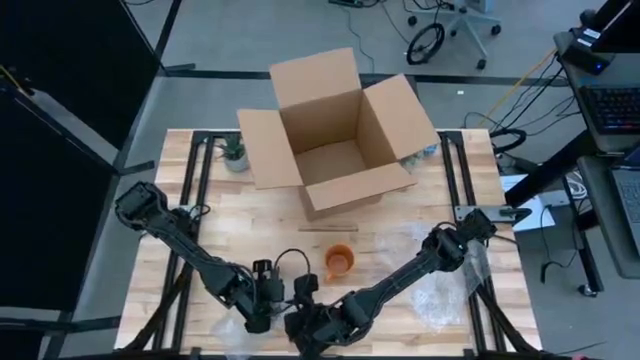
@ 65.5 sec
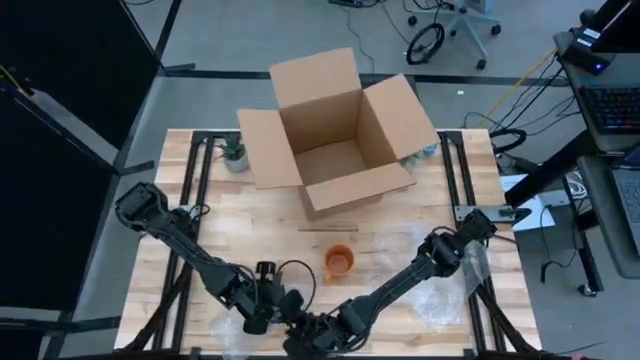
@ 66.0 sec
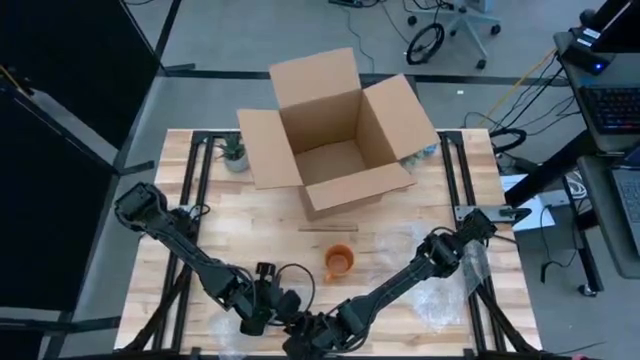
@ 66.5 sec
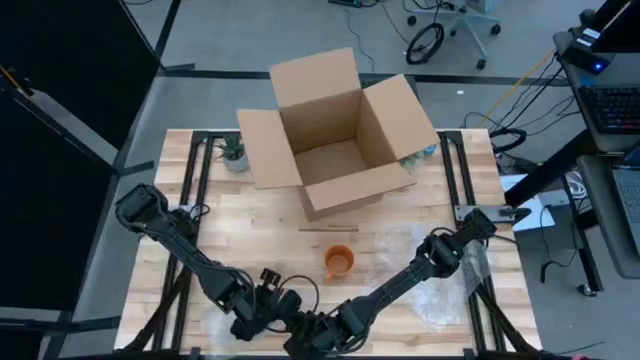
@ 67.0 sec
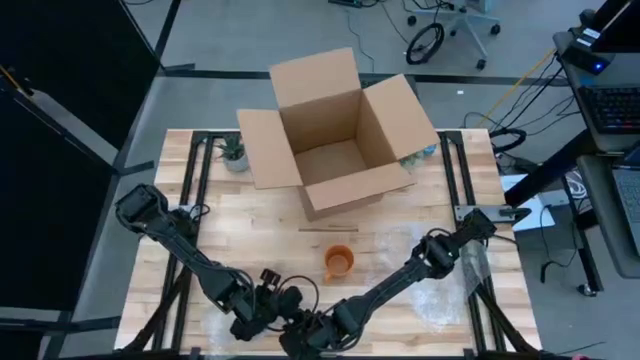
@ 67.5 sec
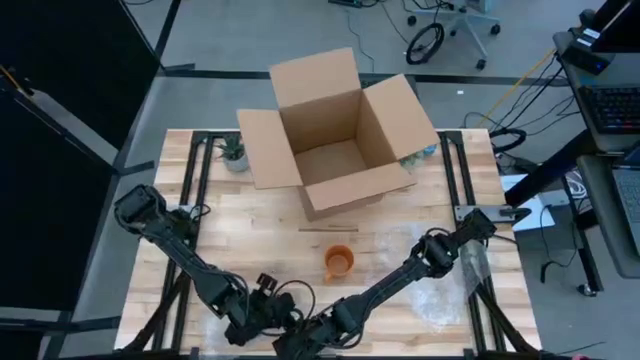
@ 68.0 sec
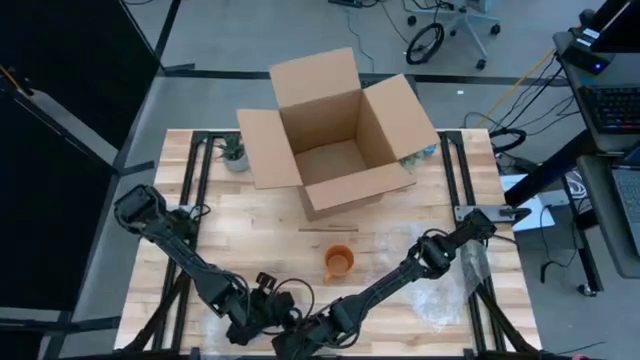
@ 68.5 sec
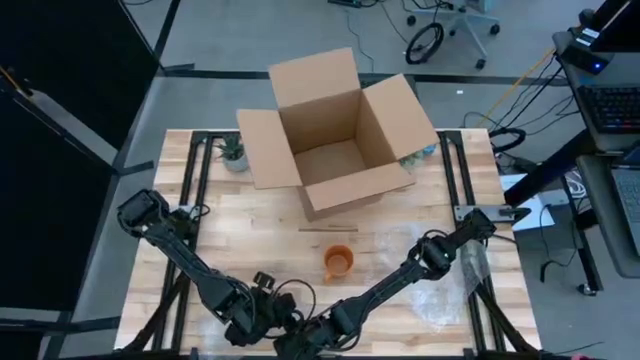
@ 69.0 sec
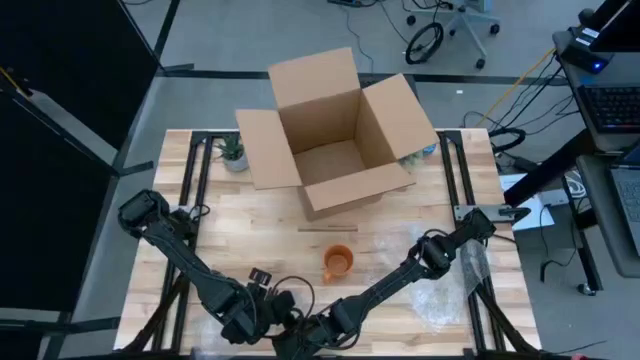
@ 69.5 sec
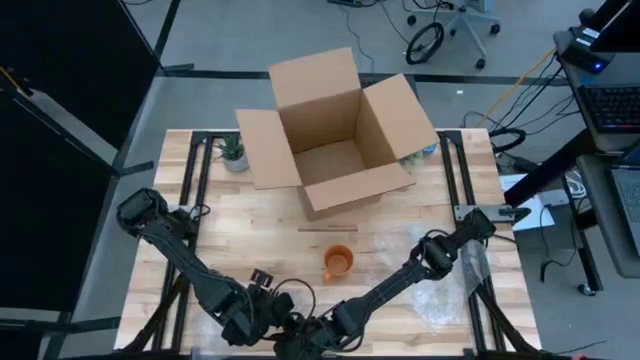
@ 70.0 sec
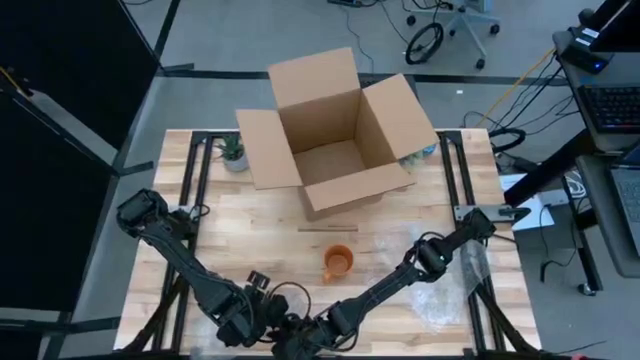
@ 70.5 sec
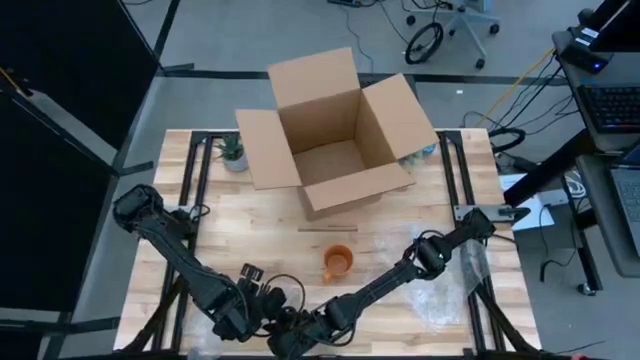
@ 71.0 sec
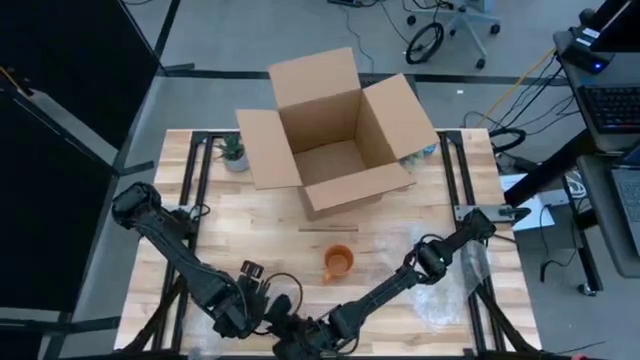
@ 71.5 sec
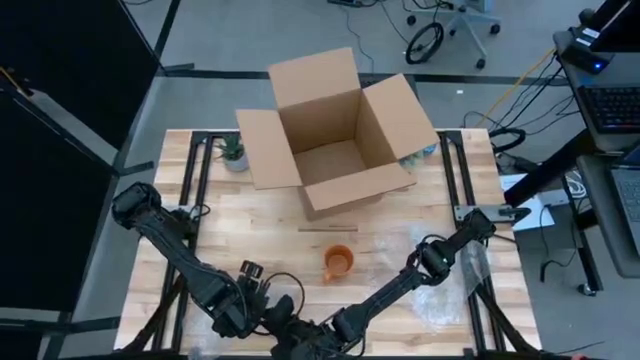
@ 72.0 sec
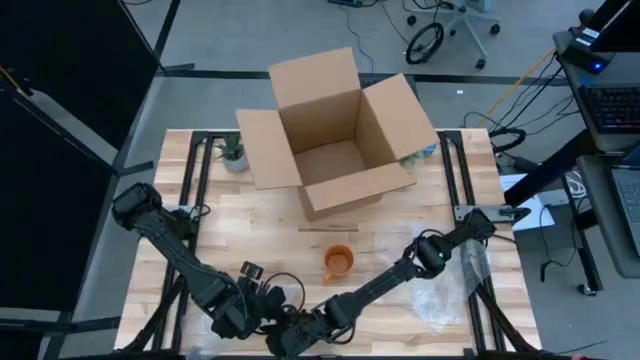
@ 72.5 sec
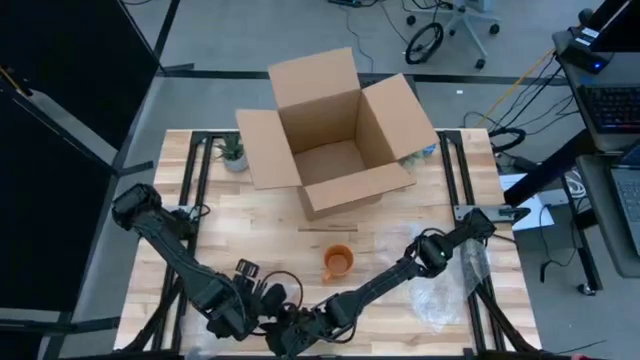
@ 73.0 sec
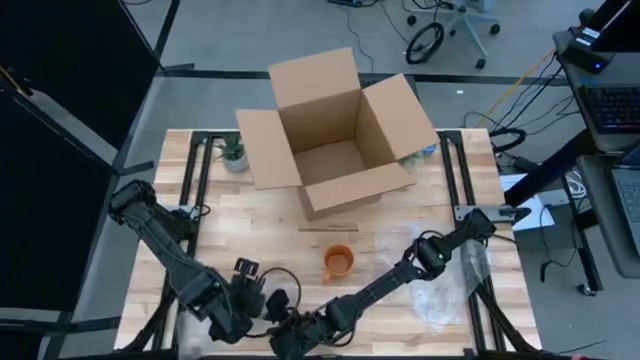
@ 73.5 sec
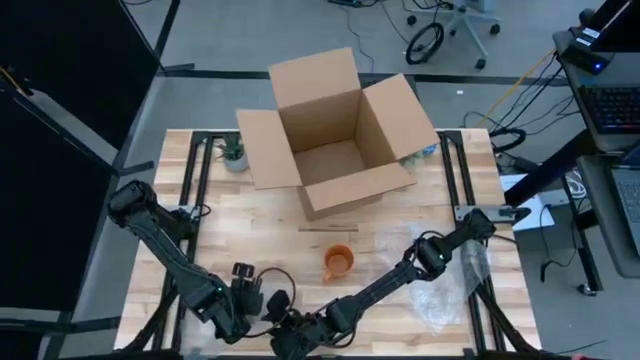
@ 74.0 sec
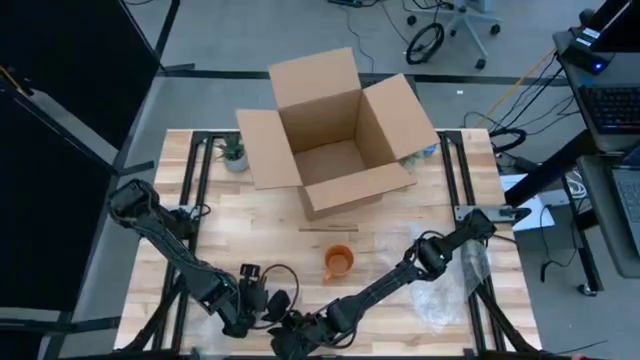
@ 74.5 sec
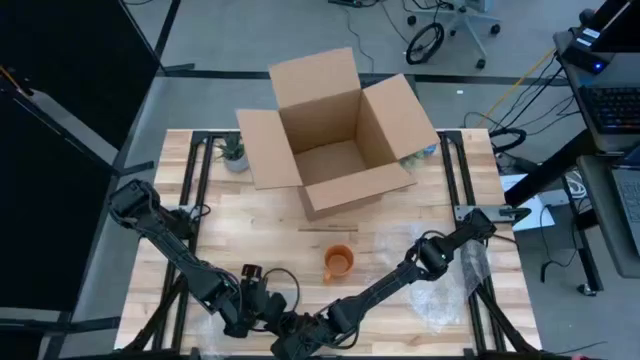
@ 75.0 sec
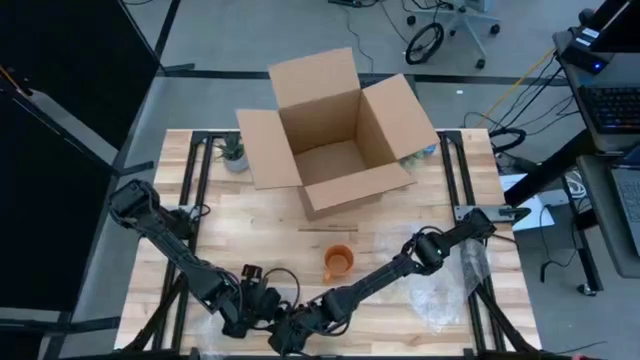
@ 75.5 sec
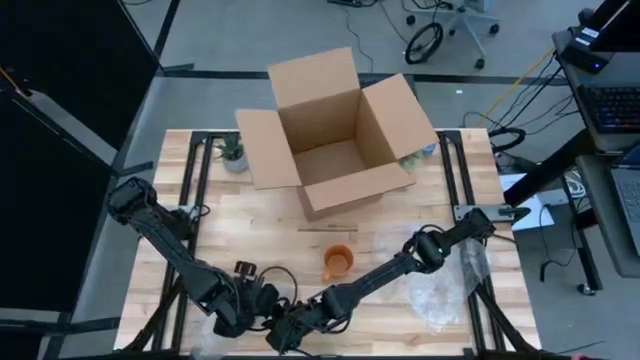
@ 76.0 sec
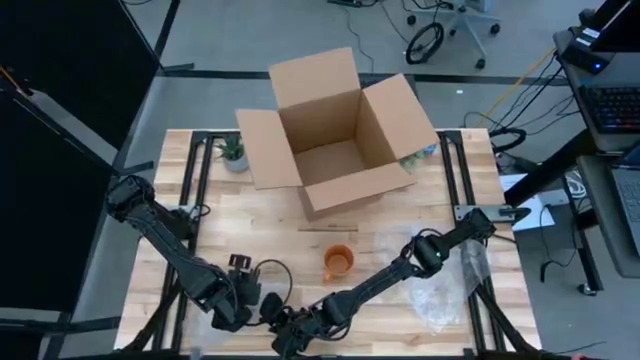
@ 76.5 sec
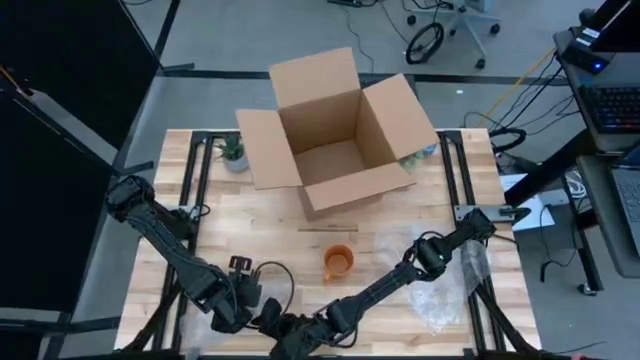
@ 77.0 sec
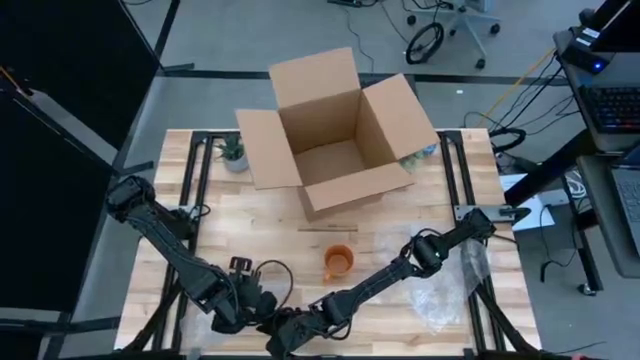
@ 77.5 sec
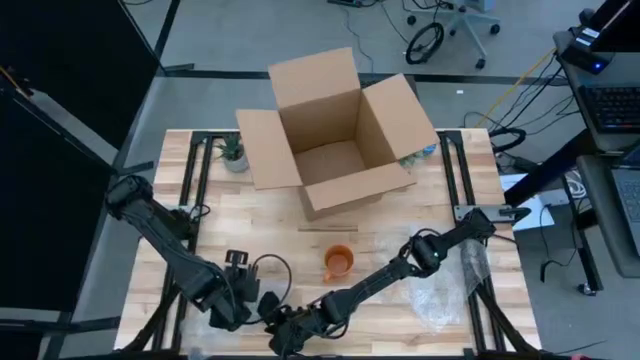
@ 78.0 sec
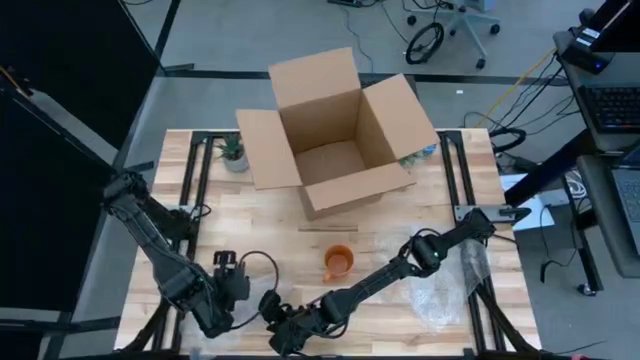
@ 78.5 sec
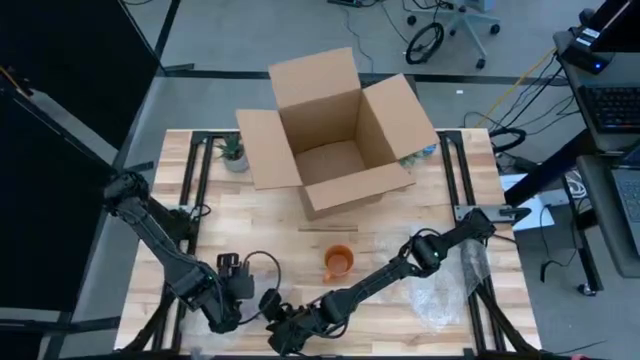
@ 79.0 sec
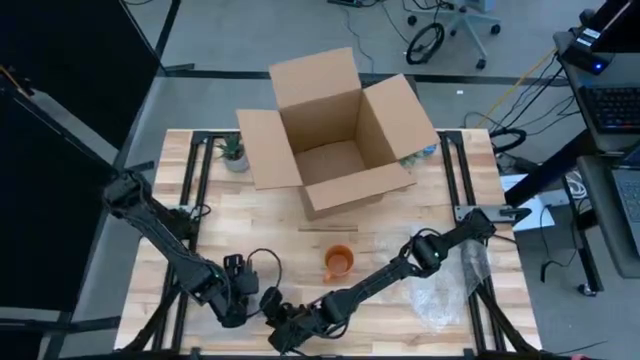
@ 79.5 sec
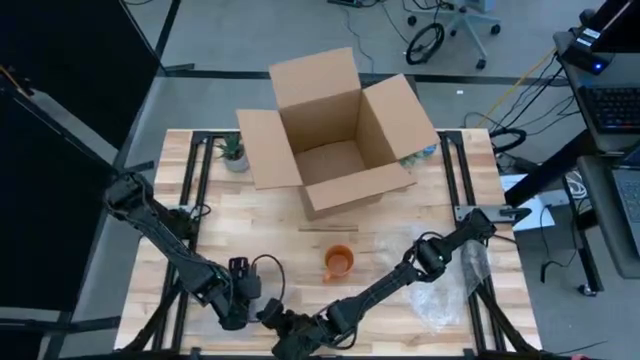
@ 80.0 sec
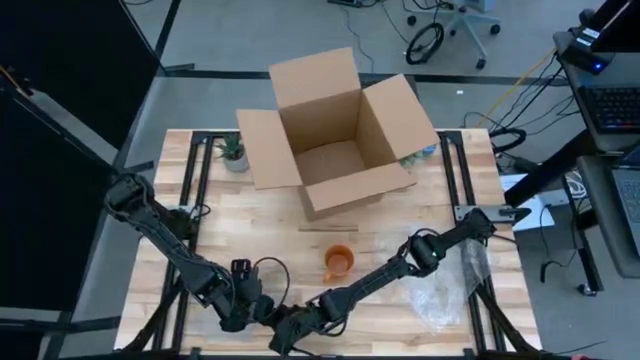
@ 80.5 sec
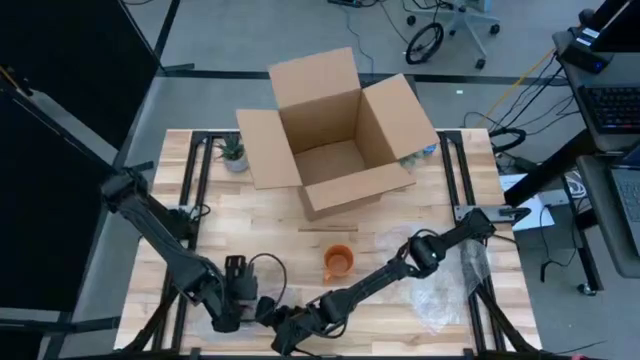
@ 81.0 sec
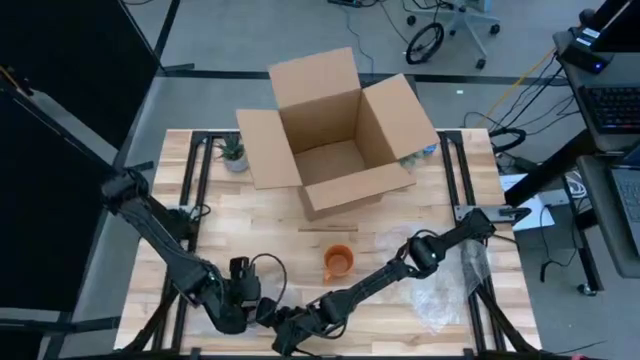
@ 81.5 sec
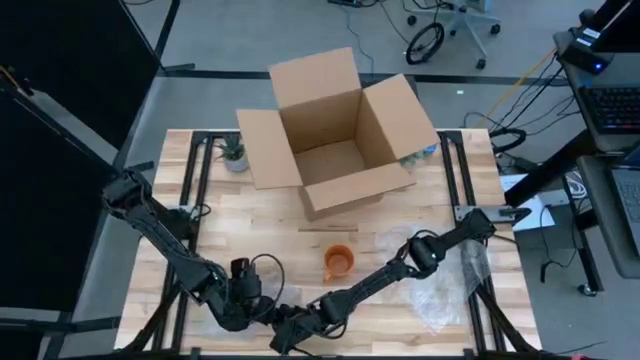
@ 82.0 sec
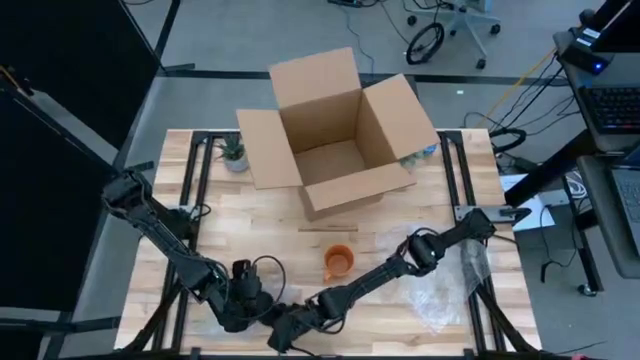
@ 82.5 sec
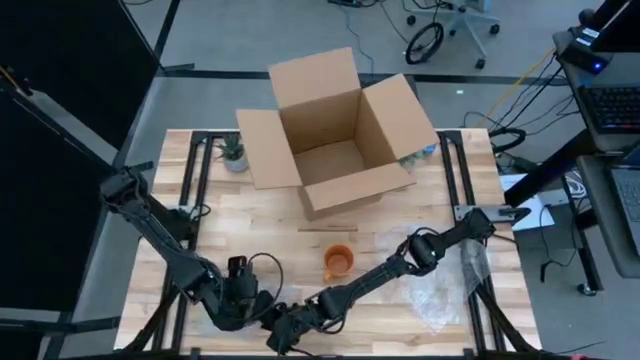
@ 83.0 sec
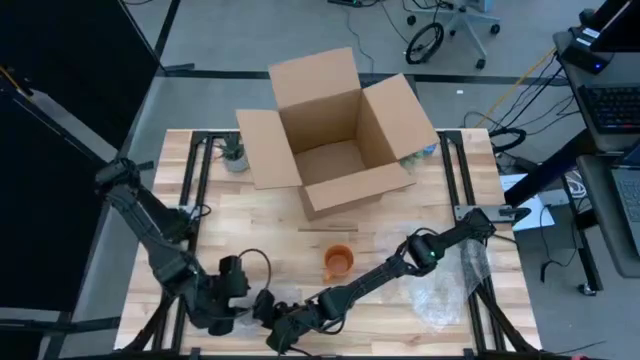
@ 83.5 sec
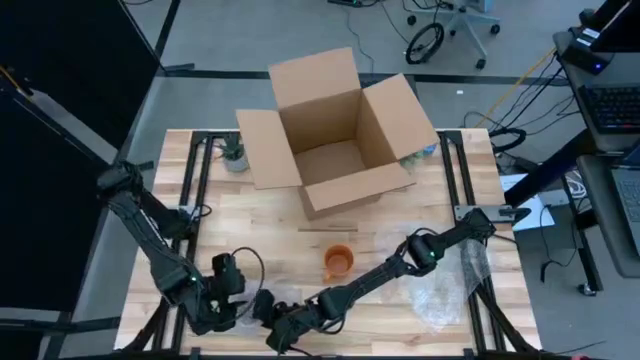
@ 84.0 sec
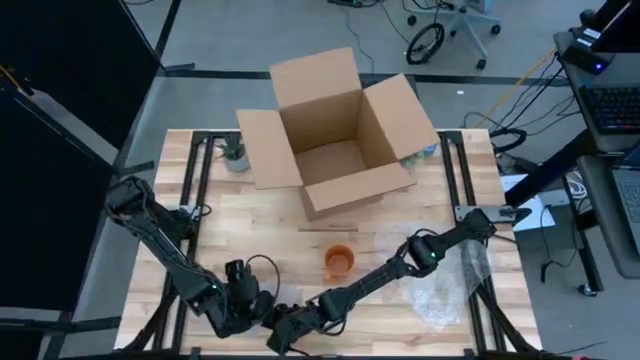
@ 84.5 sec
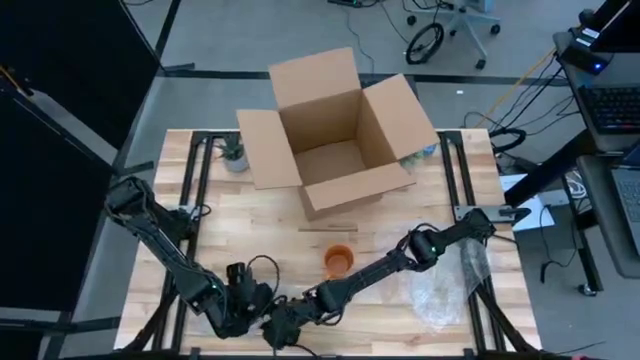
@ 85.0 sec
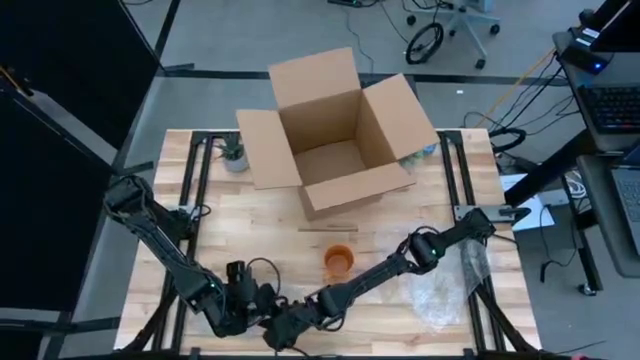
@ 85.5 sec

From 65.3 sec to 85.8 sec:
Task: wrap mug
Wrap the pink mug with transparent bubble wrap
